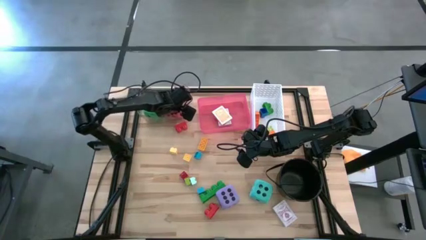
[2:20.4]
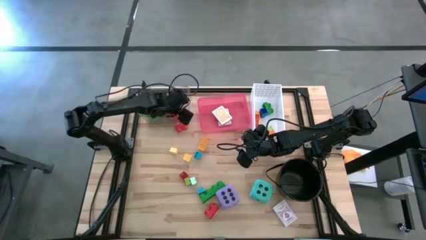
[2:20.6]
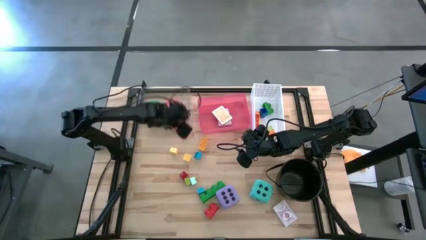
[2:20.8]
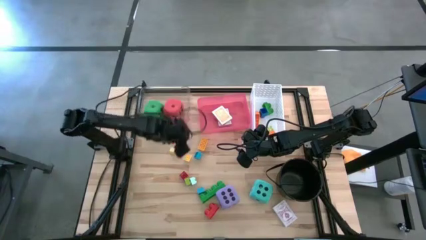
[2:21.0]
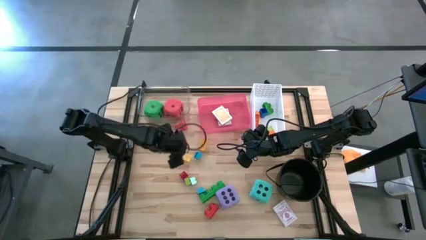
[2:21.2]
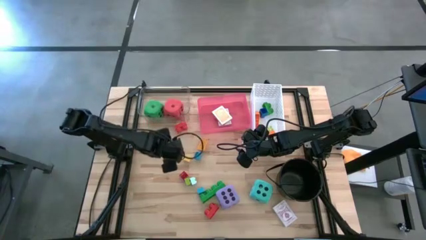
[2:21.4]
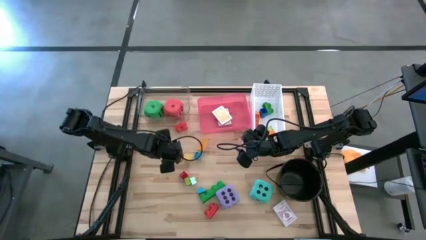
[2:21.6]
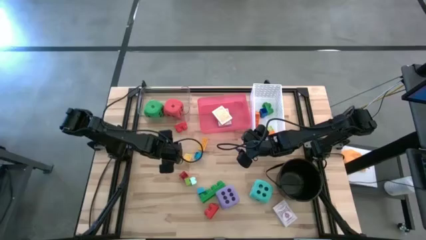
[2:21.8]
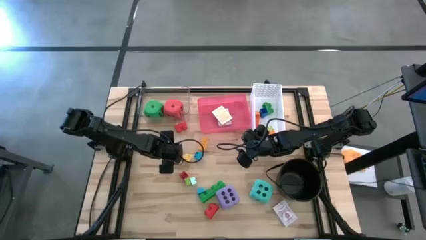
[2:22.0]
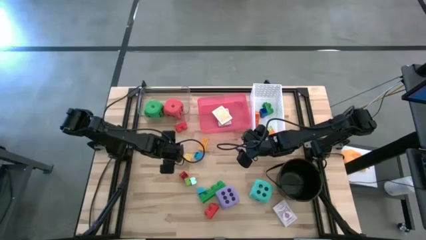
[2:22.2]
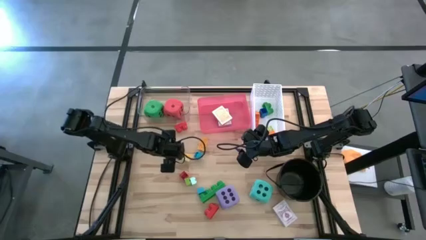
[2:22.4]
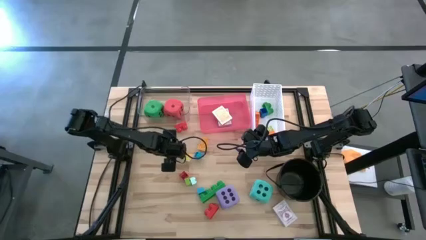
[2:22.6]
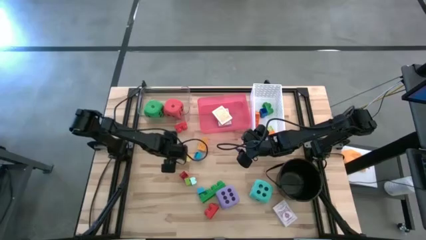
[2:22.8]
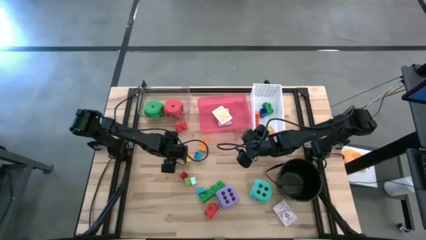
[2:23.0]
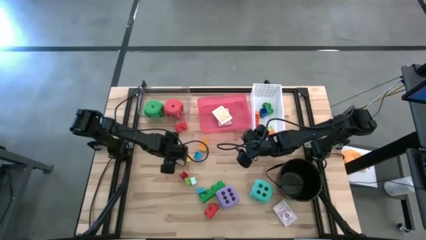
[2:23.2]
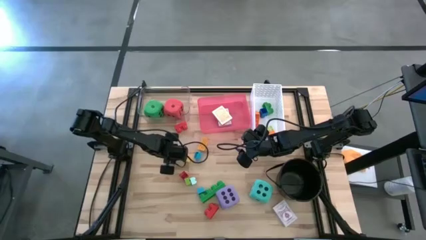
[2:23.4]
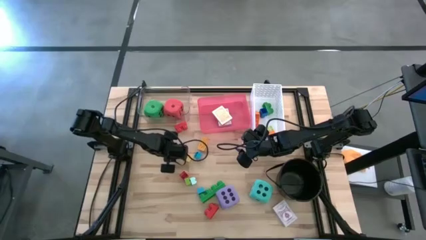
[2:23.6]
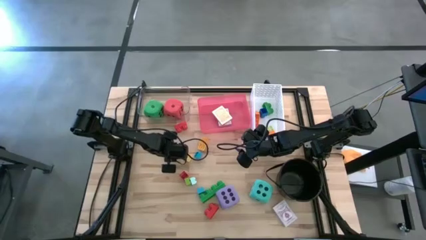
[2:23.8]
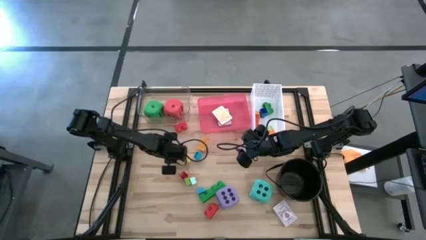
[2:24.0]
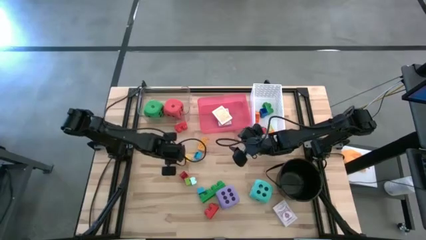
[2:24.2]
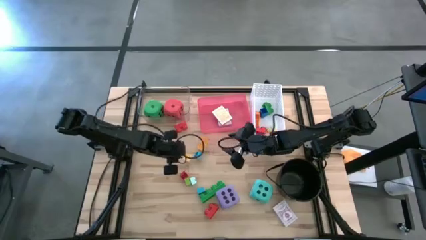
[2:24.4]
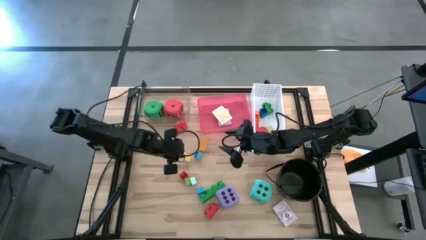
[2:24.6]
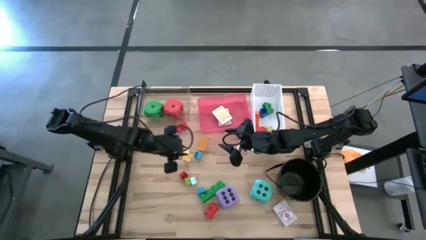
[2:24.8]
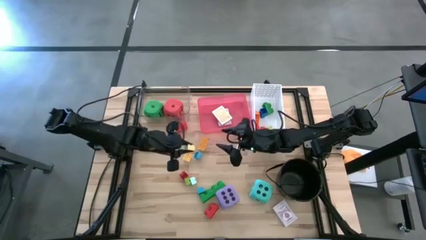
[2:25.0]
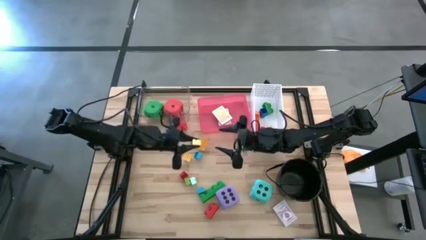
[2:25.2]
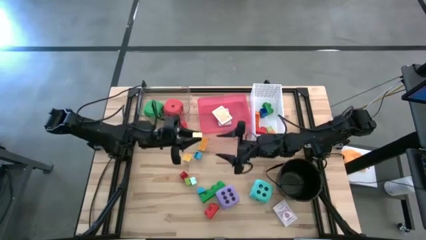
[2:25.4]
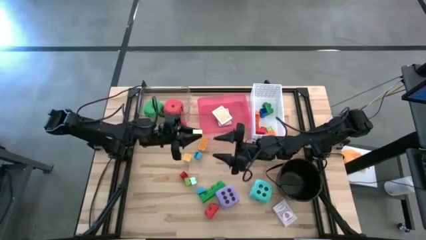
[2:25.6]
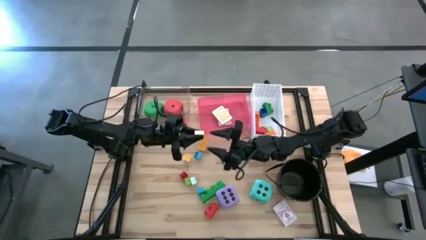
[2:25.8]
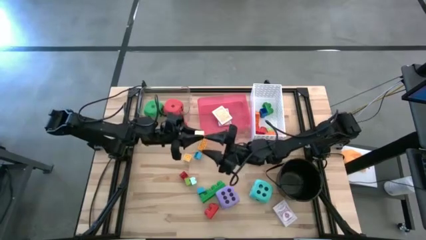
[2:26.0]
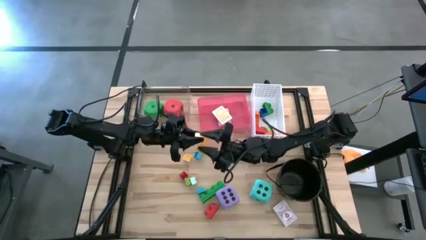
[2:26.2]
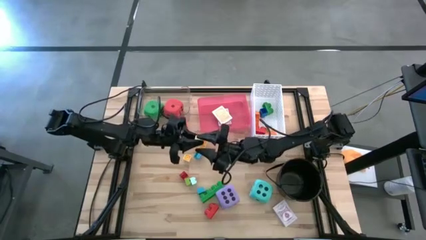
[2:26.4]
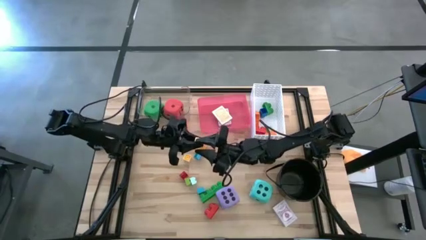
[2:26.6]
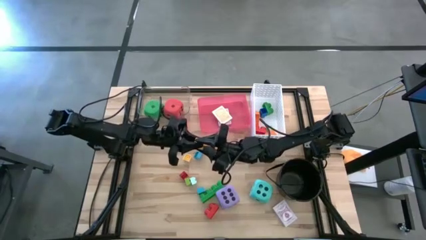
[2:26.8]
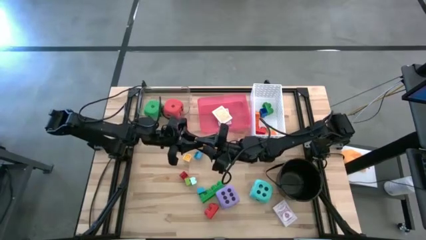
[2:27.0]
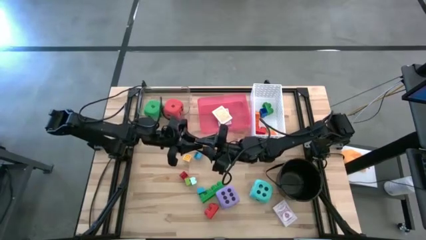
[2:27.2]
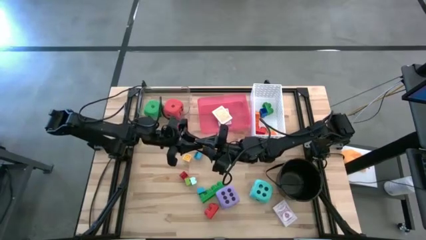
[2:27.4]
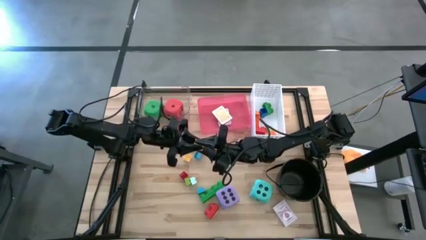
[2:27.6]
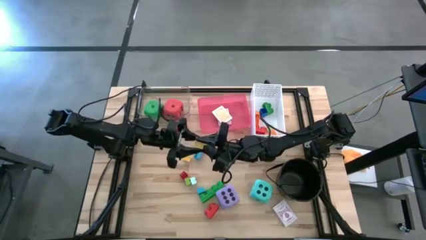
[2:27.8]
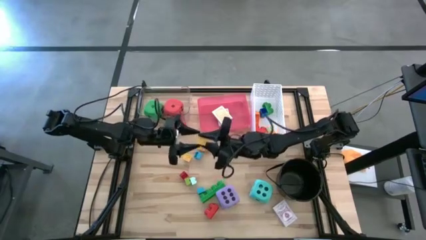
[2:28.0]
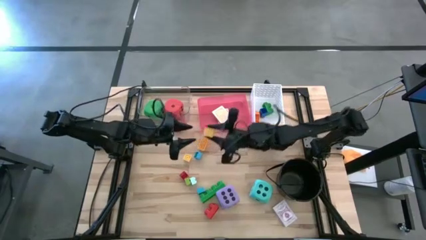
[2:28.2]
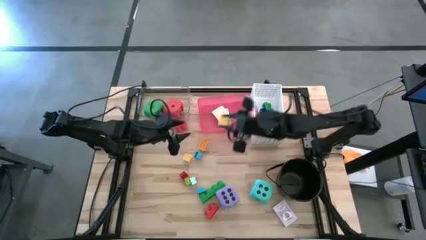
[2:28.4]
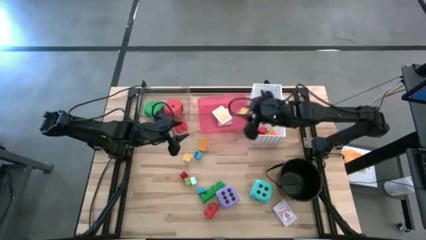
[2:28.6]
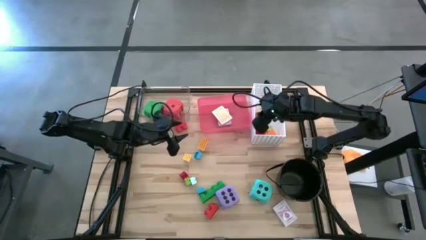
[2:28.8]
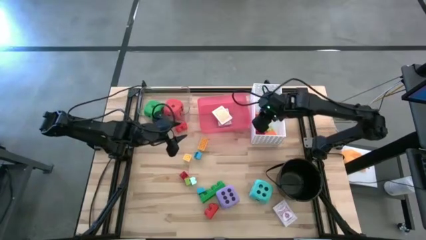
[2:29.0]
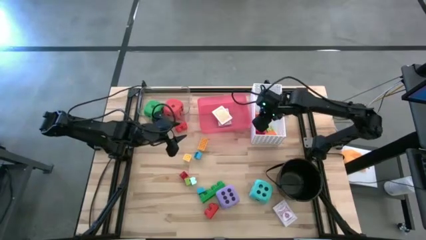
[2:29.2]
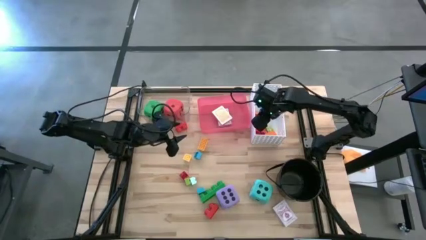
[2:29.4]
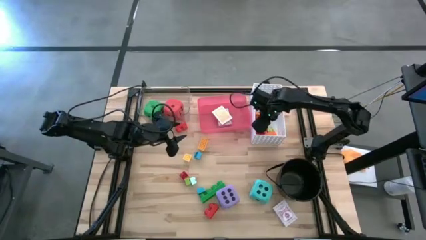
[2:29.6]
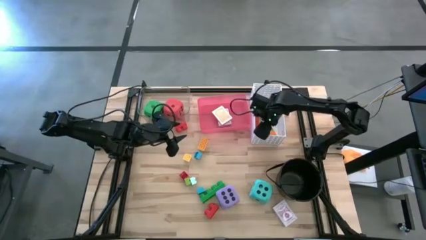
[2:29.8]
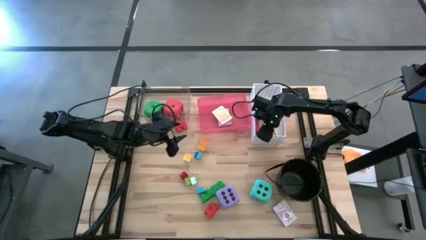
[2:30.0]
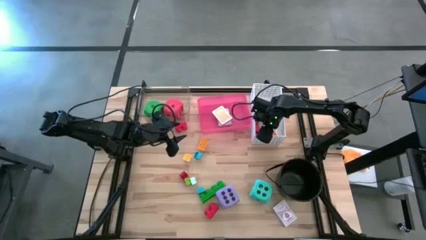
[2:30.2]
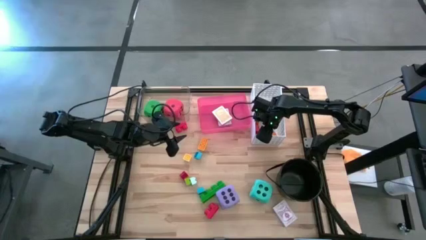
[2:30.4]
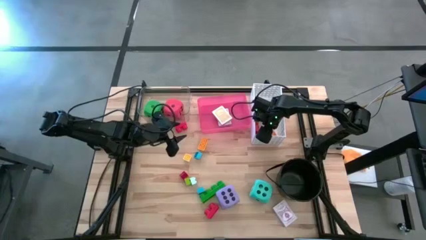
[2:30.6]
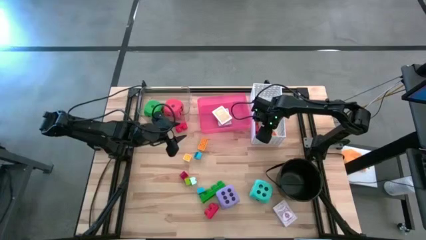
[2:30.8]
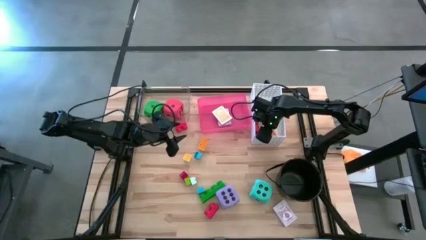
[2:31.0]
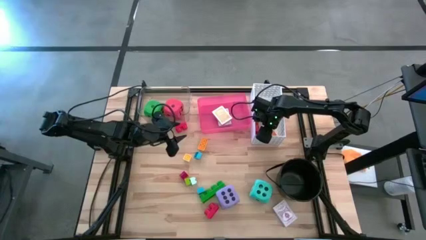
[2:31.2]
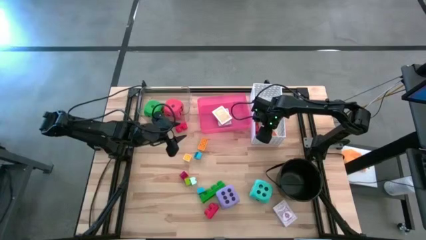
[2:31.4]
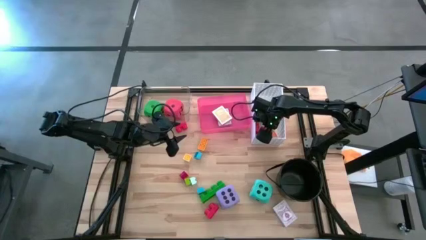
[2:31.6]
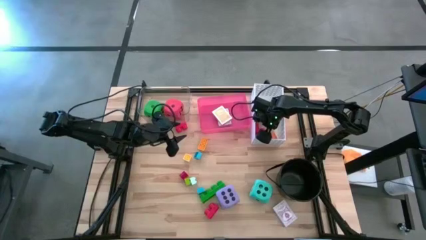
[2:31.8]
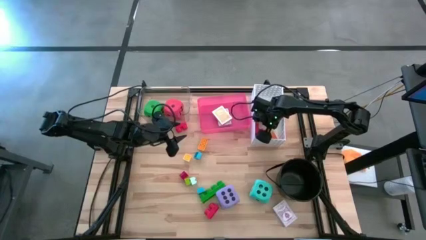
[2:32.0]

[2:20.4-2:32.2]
Task: Pick & Place Toys
Put the left small light yellow game piece into the white bin

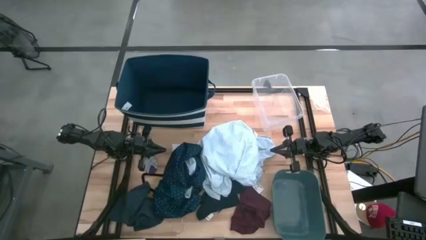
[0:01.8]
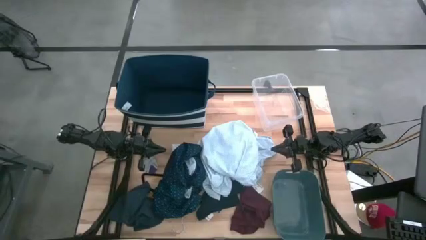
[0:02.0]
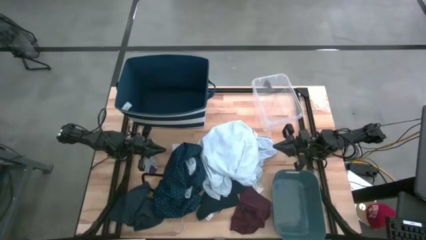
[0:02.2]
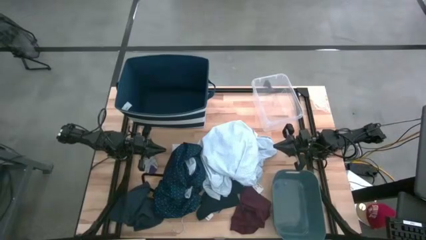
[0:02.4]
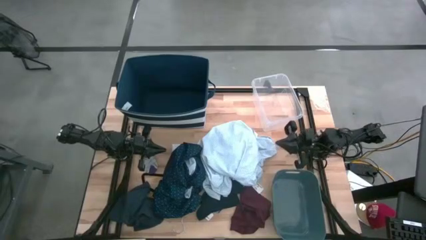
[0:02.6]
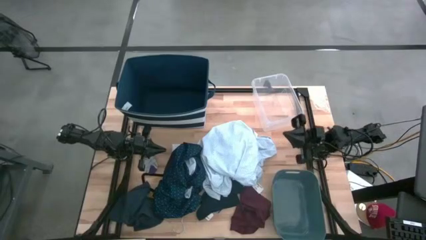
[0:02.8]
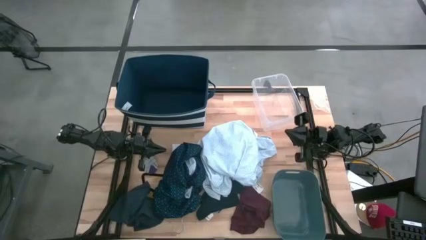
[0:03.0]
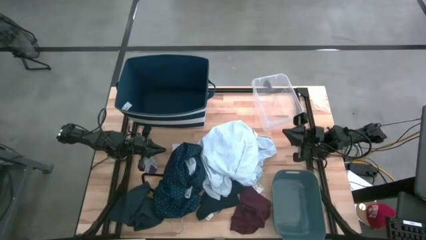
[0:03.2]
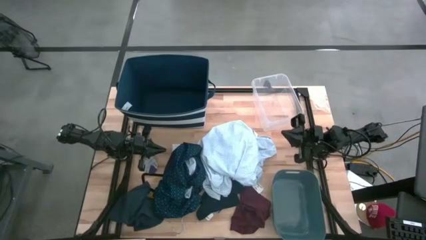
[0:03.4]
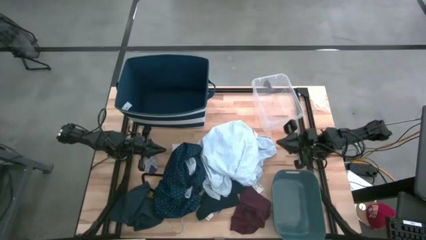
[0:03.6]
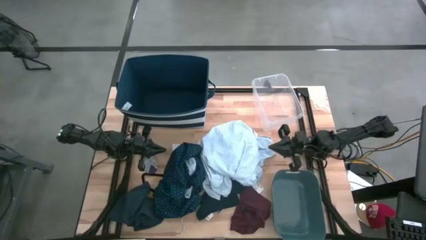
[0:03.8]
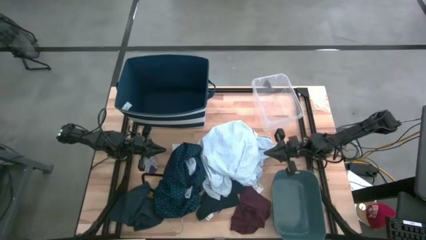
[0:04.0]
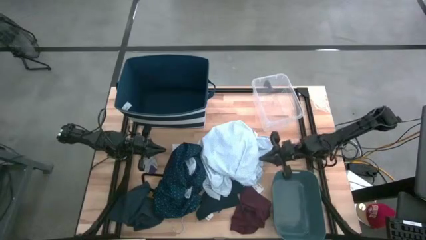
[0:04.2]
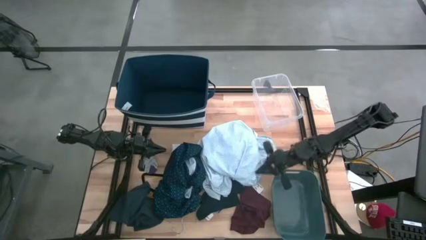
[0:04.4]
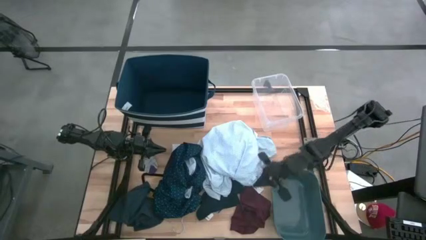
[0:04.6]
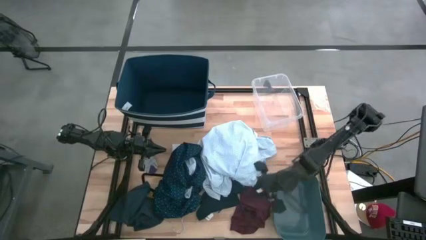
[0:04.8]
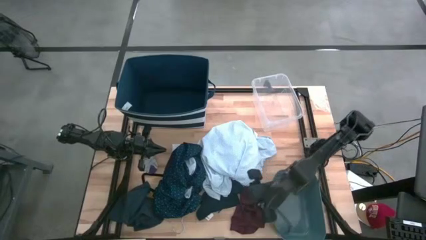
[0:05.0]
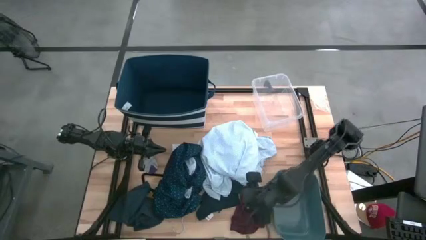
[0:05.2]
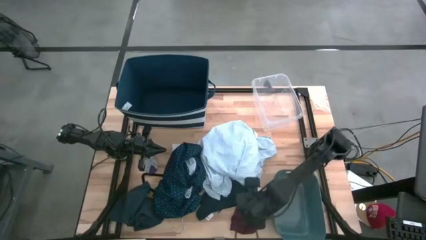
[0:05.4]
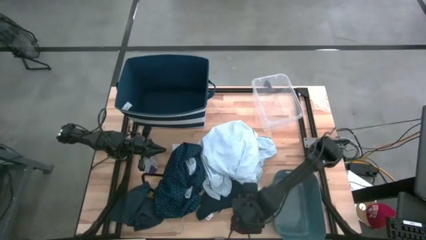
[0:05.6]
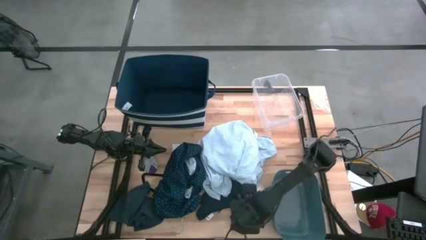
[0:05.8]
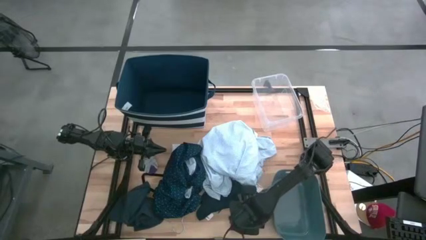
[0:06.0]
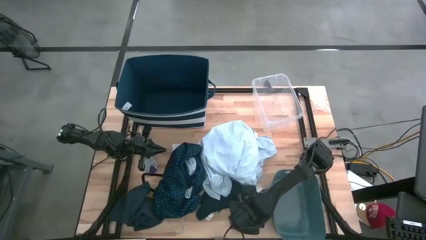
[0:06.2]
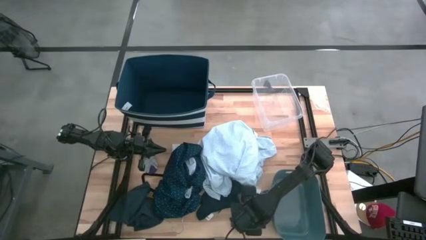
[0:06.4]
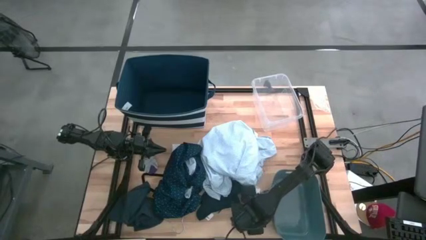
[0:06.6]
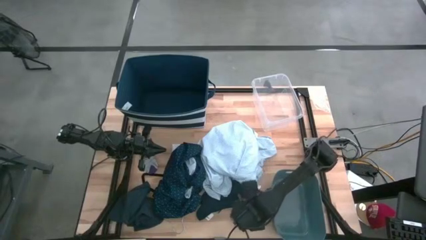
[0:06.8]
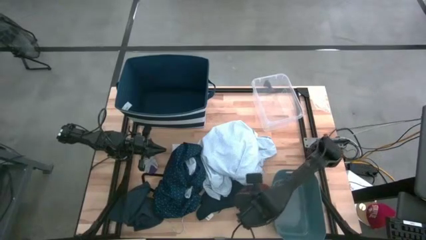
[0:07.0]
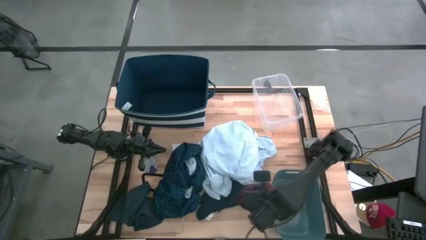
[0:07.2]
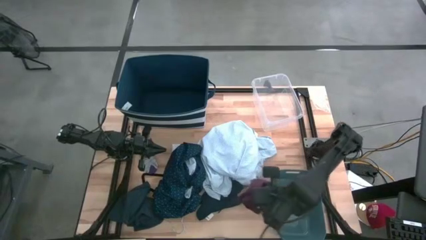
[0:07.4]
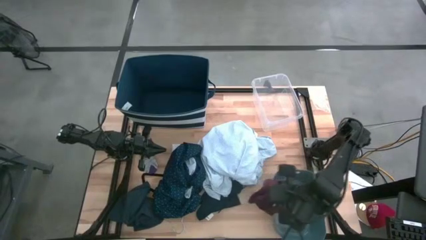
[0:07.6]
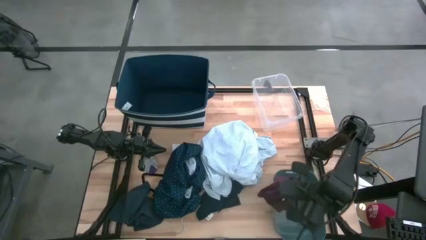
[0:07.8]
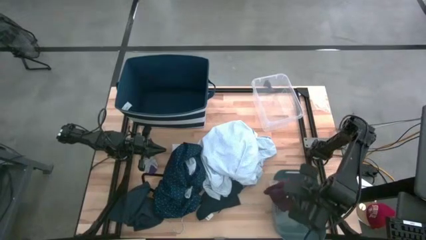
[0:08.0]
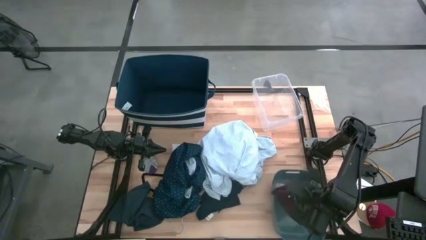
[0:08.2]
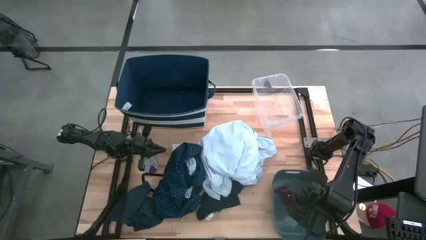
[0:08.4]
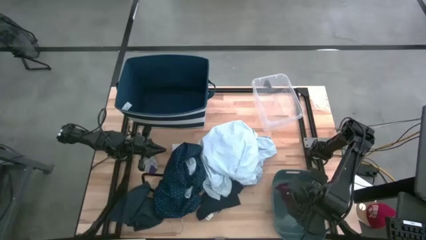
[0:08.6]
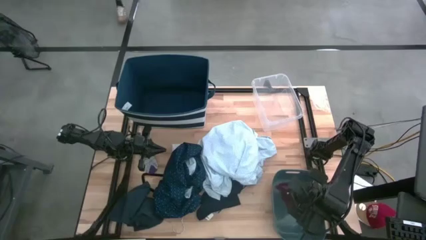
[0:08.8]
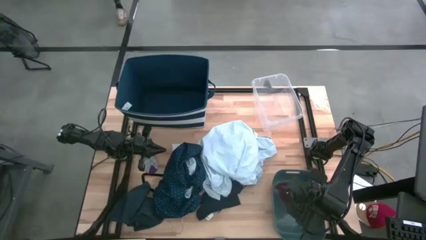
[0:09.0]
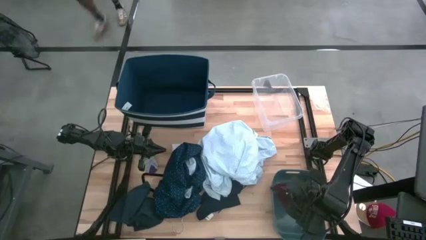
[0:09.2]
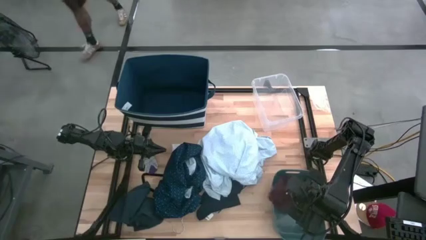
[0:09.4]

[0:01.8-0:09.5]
Task: Pick & Place Cloths
Put the brown boxer into the green bin
